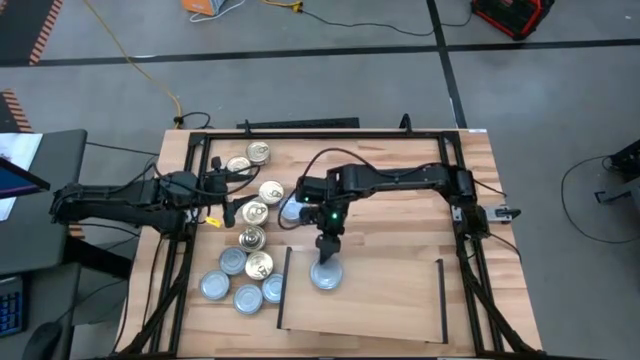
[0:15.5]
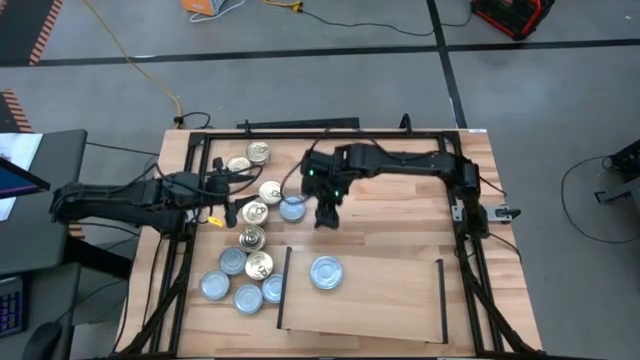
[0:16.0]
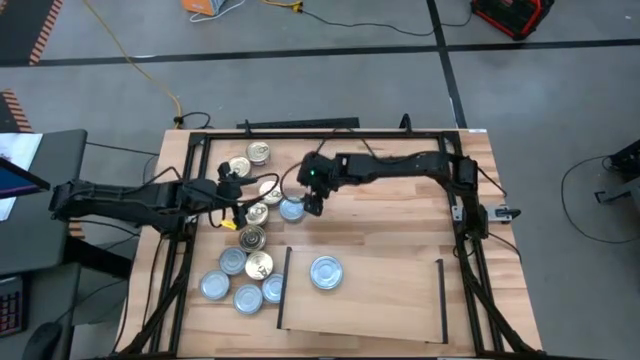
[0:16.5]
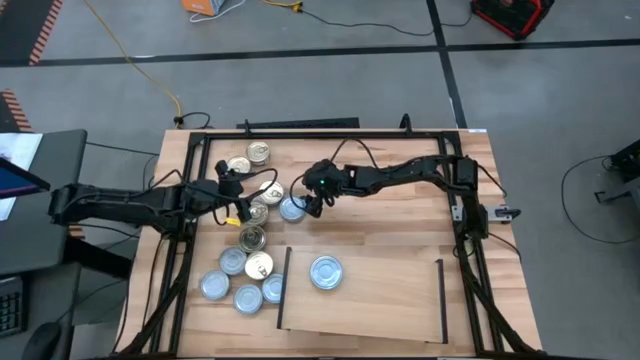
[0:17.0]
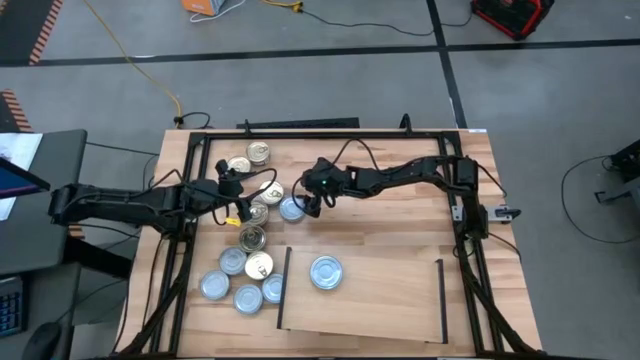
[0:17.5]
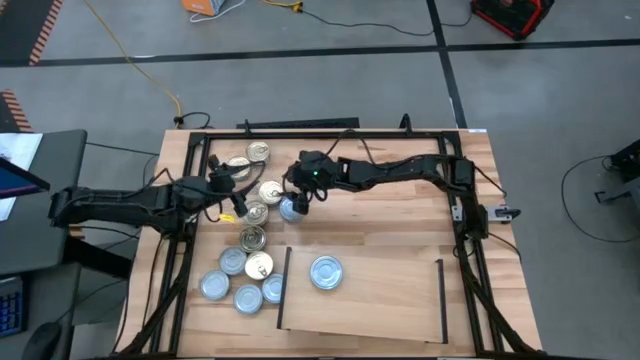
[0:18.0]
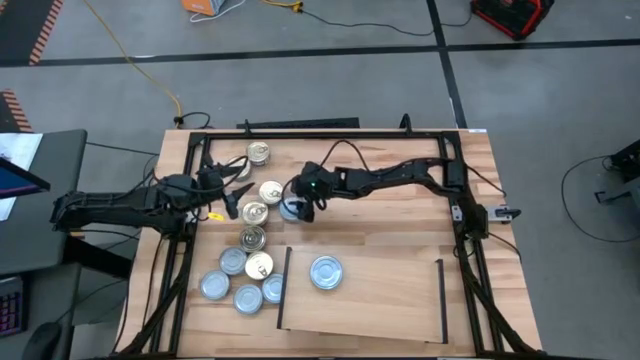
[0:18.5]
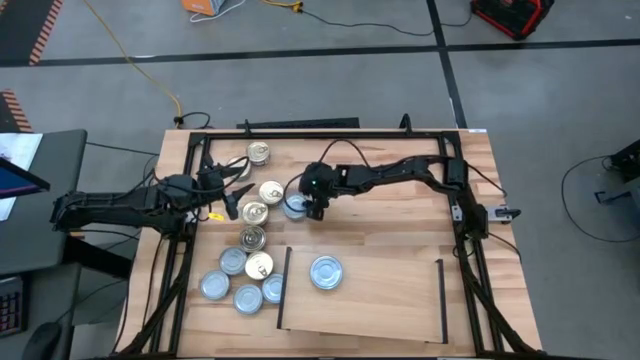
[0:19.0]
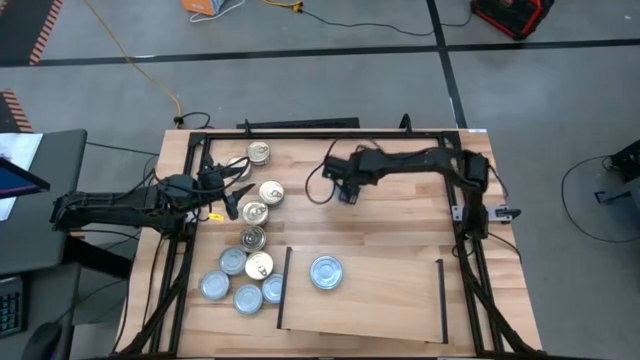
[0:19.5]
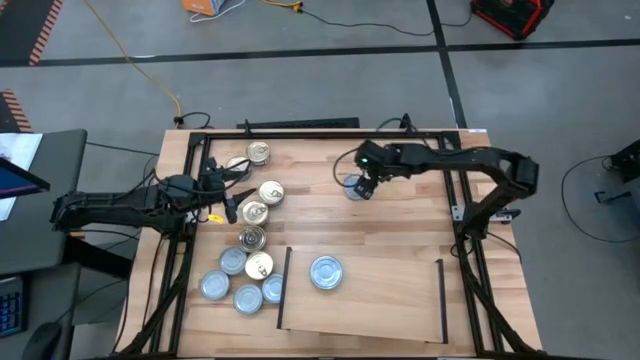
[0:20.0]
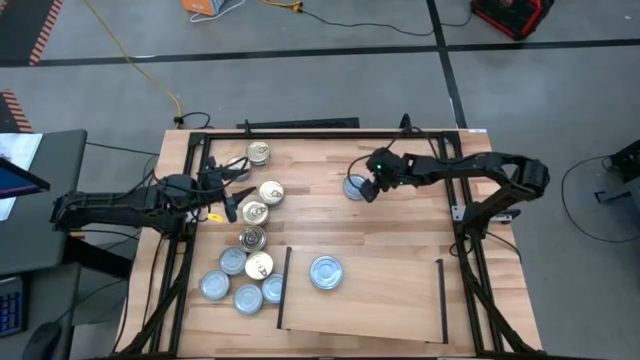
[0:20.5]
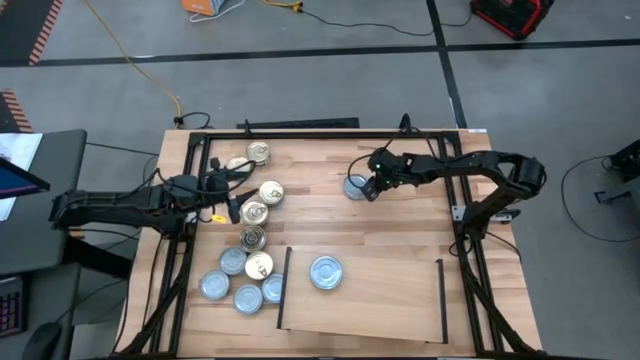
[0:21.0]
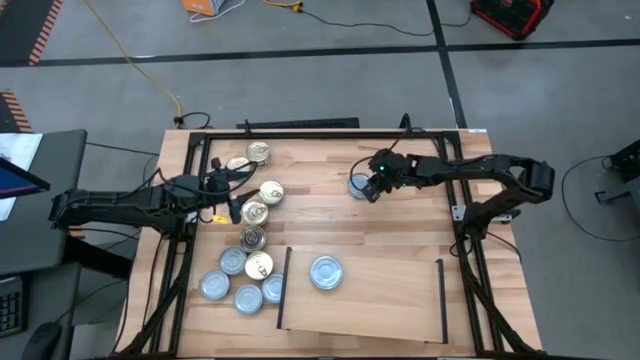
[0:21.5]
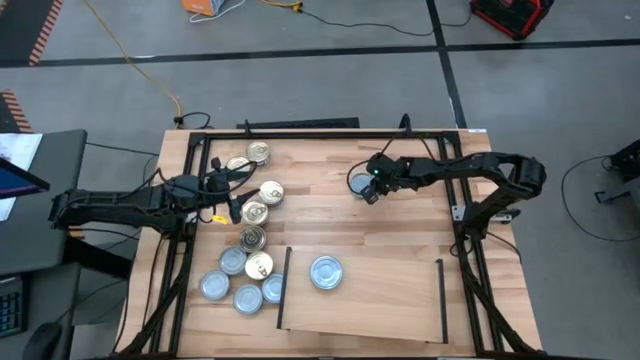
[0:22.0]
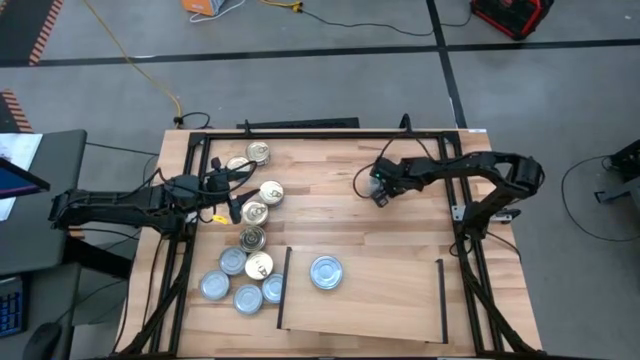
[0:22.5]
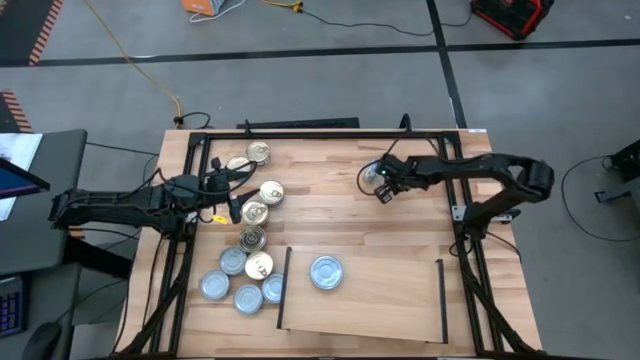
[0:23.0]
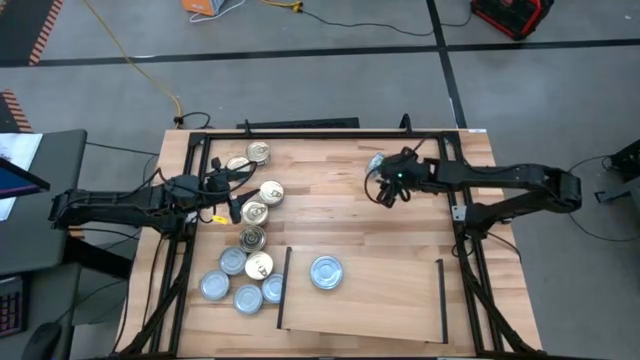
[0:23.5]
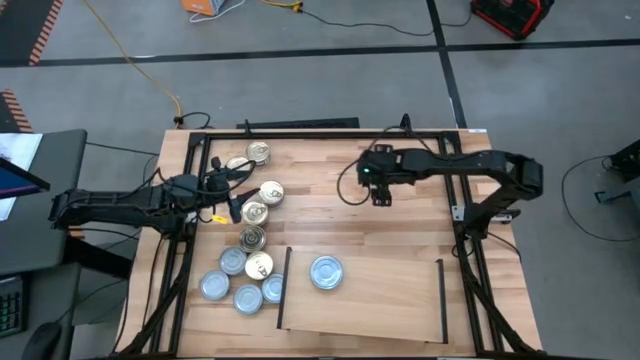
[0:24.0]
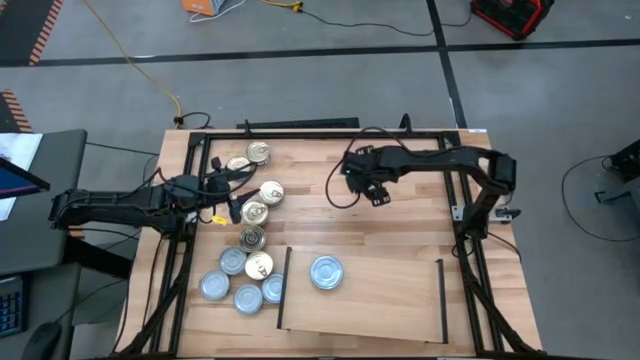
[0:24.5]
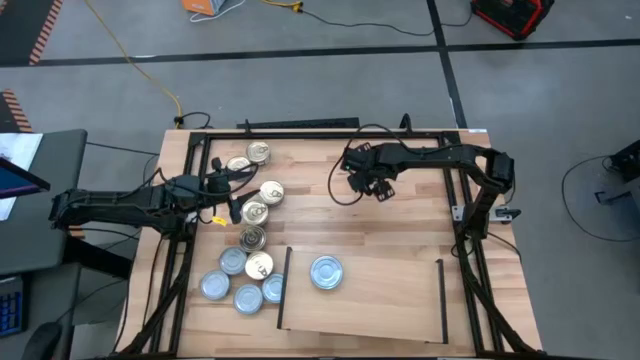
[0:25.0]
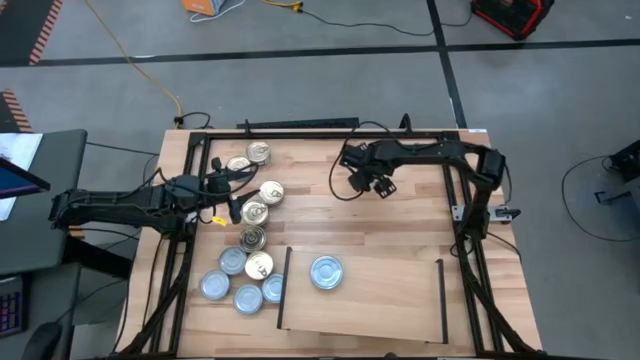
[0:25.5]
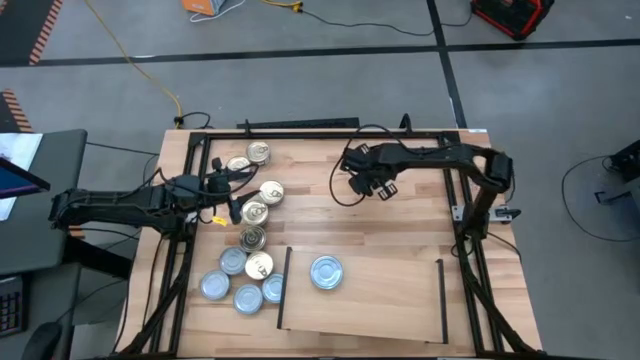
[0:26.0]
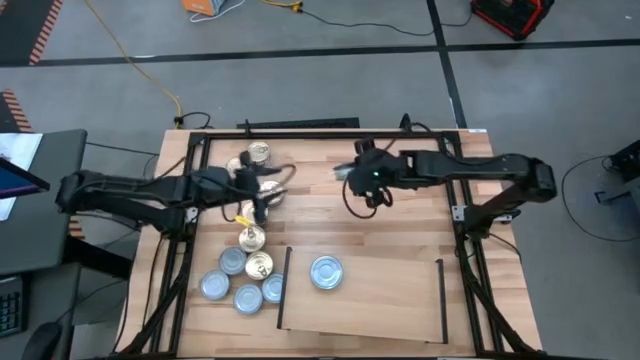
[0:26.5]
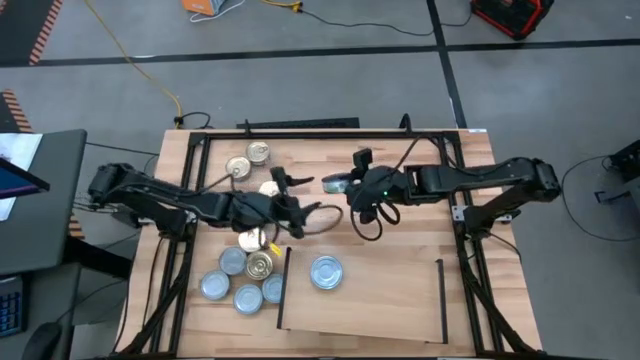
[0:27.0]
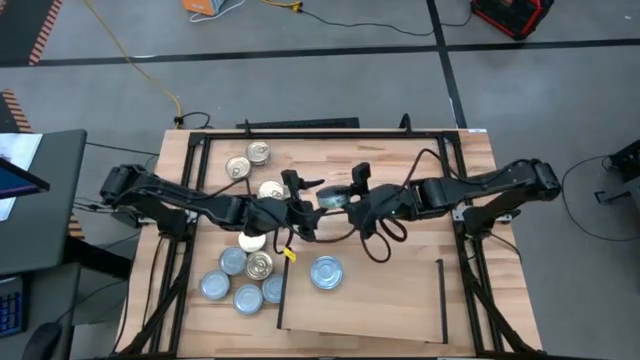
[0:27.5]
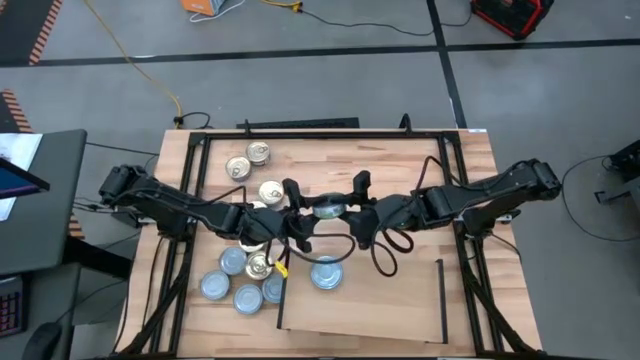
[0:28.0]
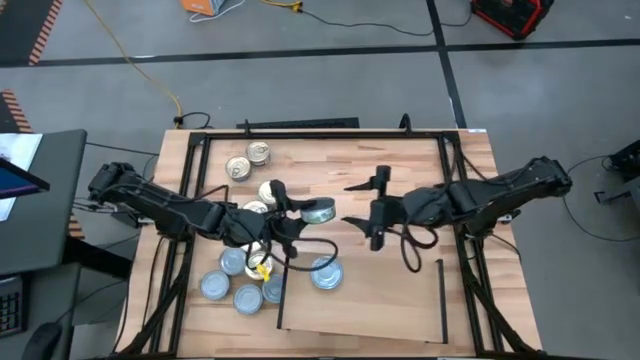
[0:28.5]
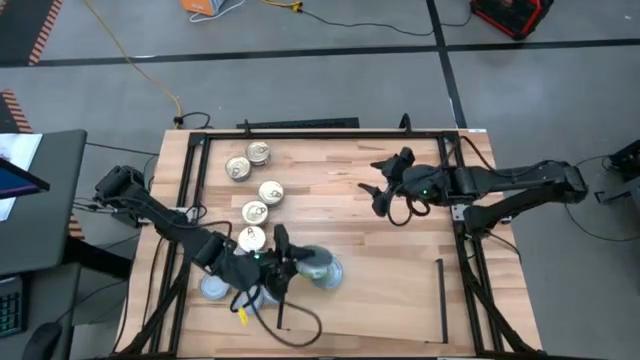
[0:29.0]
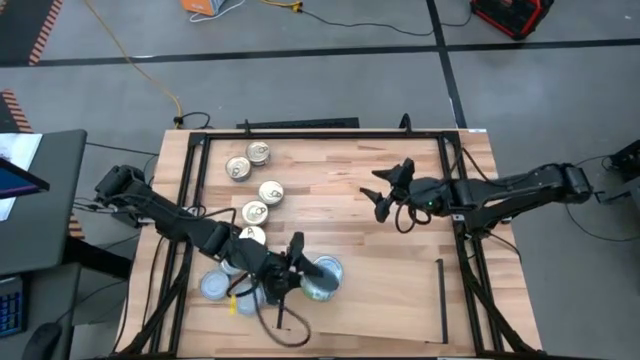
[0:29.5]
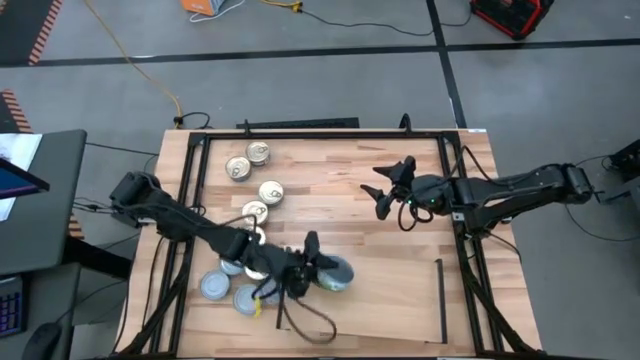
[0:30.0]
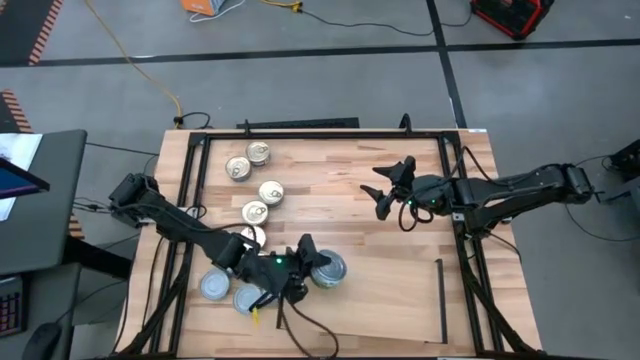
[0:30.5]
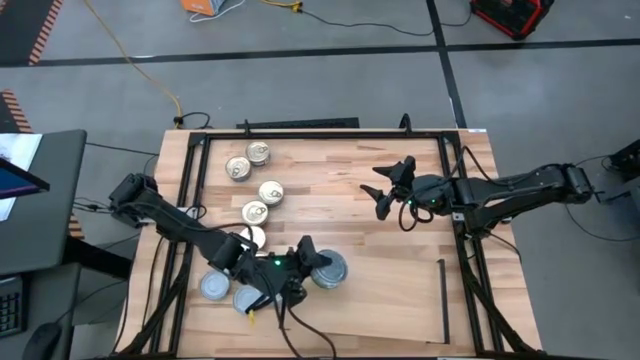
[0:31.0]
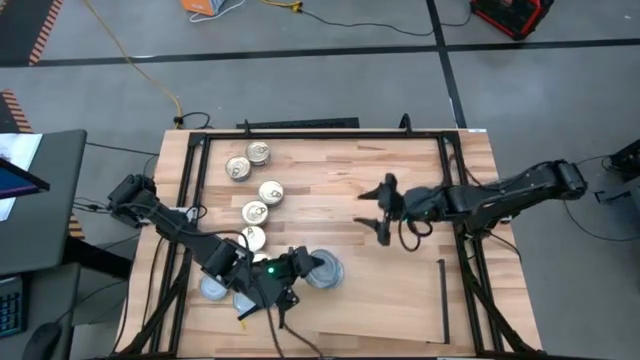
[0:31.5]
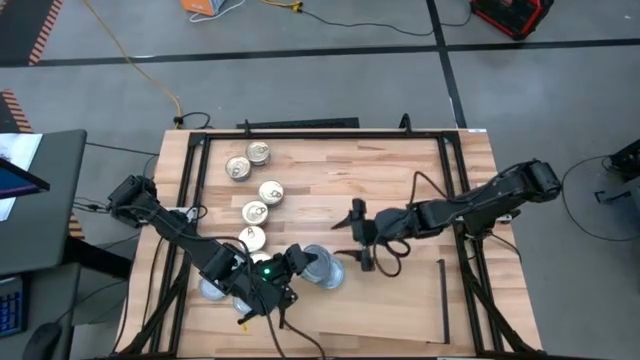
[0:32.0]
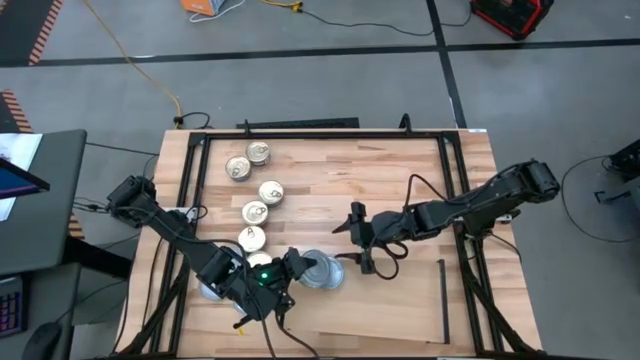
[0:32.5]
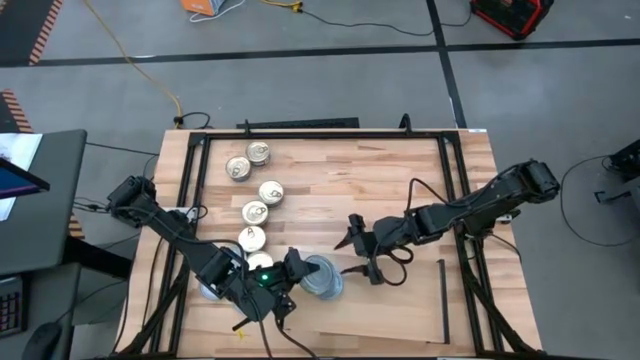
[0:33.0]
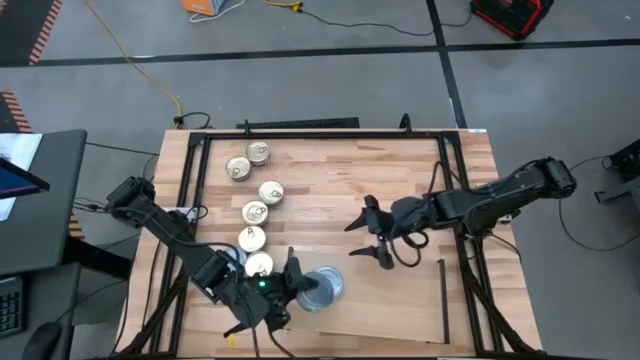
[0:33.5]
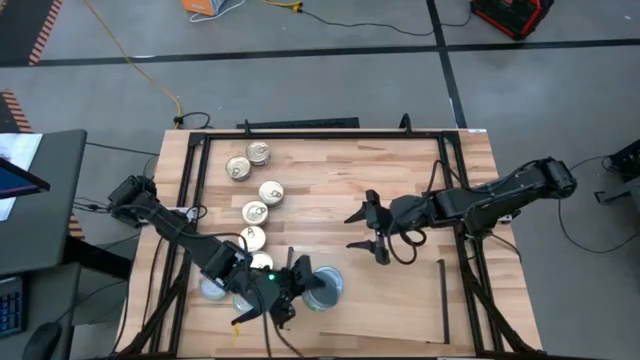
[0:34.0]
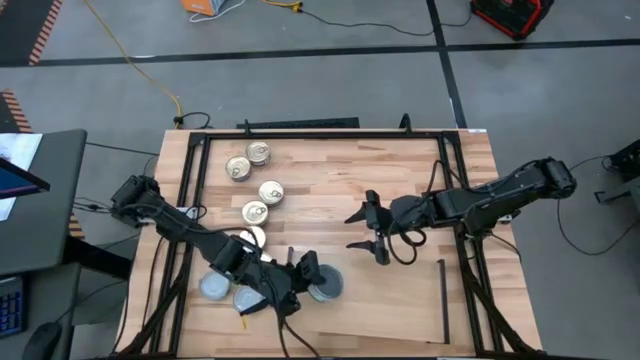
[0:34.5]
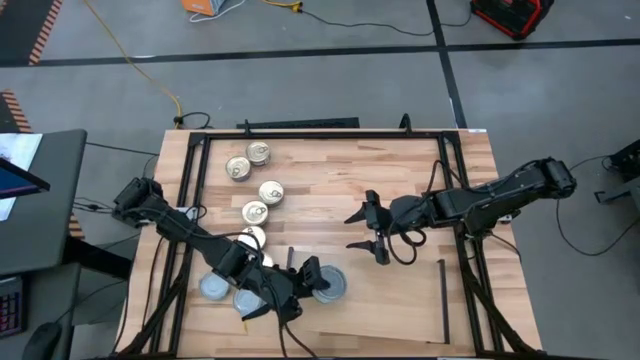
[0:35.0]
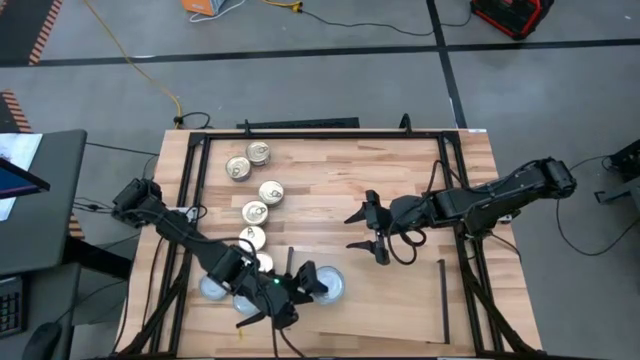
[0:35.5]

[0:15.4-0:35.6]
Task: Stack canned seafood by type on shelf
Stack the green tuna can on the top of the green tuna can on the shelf
